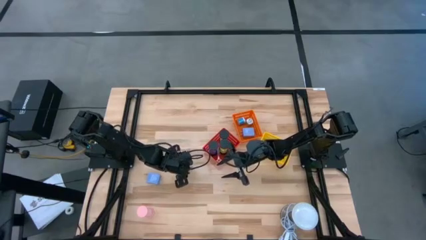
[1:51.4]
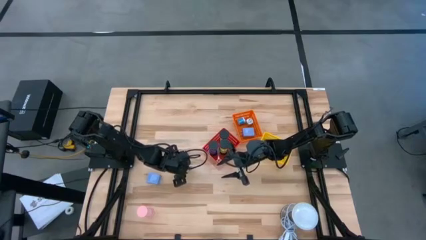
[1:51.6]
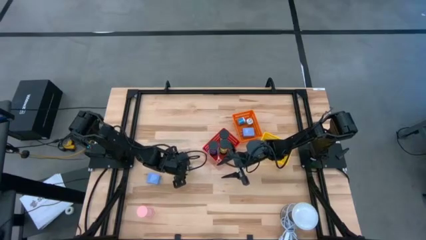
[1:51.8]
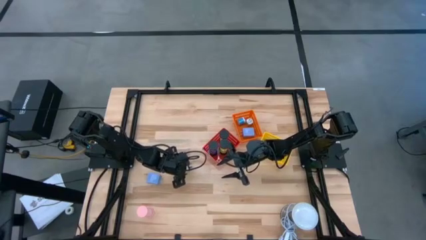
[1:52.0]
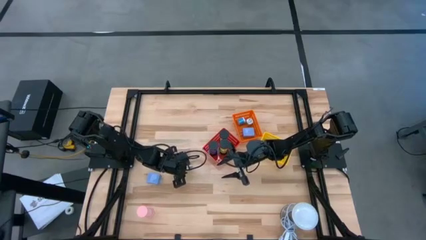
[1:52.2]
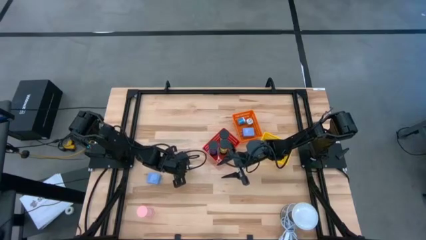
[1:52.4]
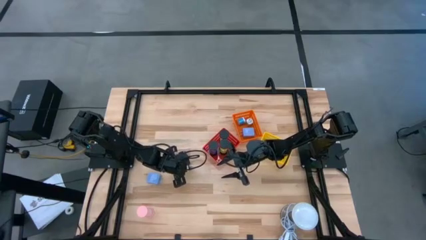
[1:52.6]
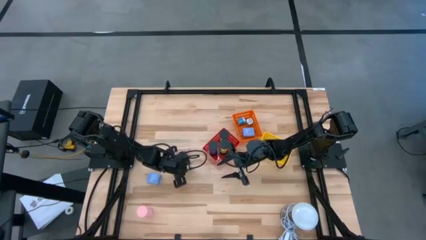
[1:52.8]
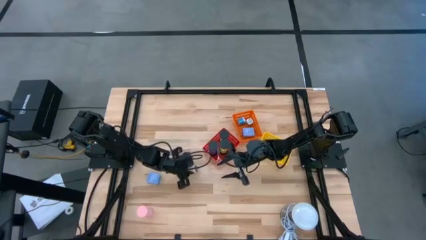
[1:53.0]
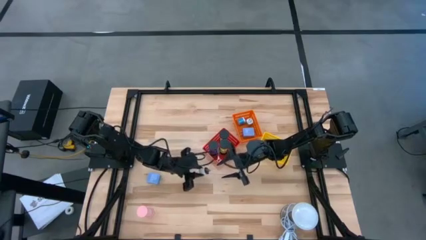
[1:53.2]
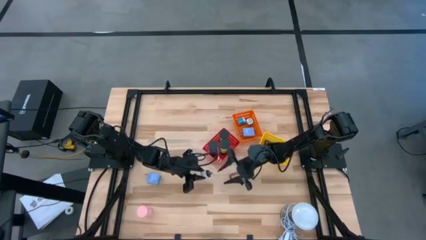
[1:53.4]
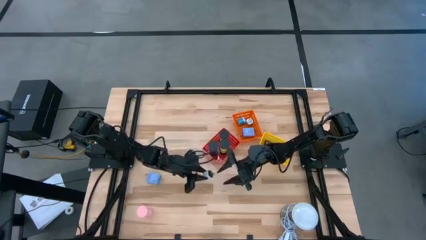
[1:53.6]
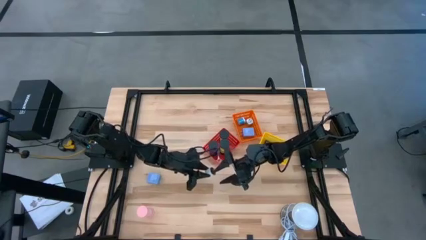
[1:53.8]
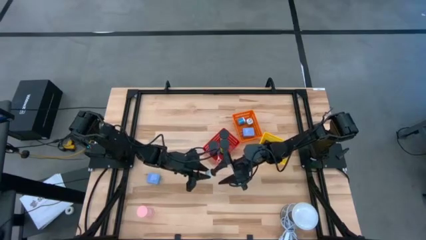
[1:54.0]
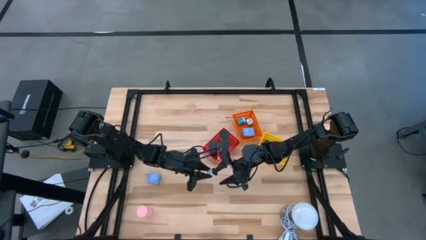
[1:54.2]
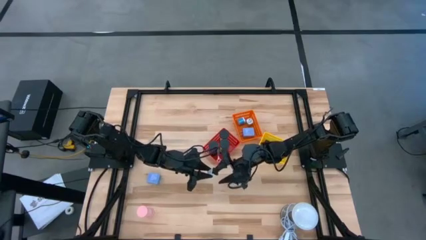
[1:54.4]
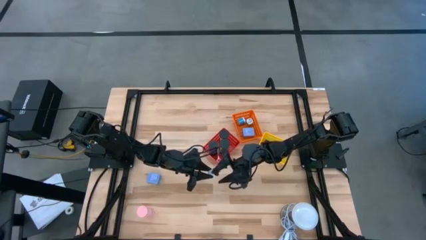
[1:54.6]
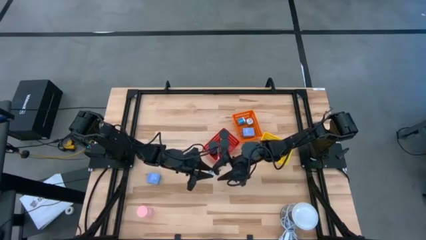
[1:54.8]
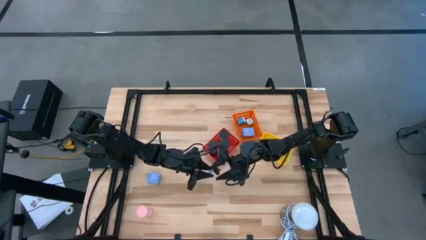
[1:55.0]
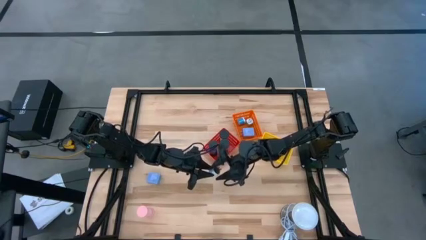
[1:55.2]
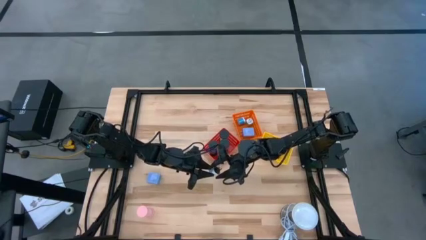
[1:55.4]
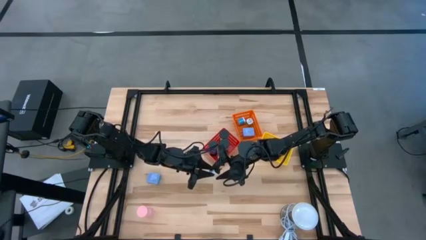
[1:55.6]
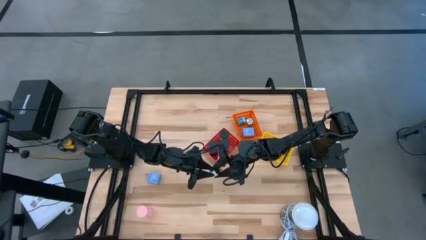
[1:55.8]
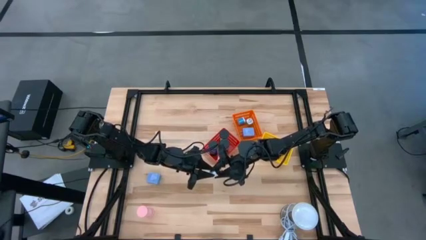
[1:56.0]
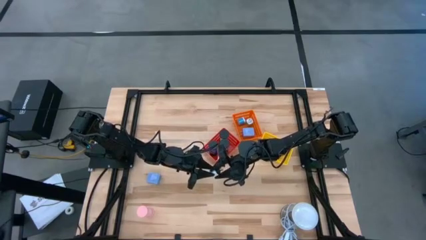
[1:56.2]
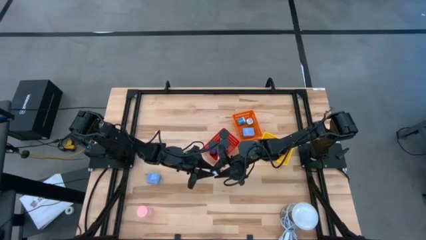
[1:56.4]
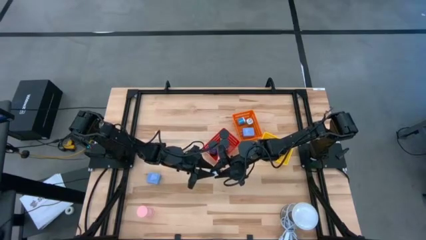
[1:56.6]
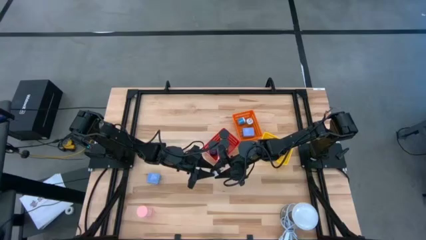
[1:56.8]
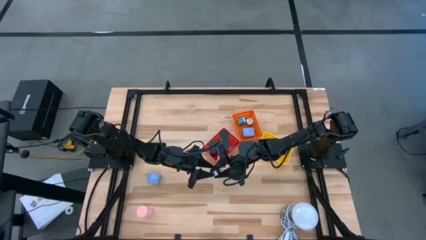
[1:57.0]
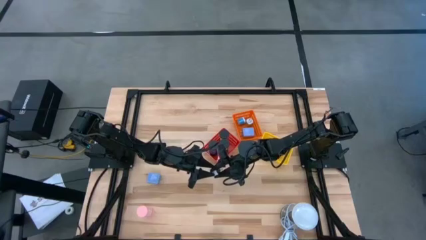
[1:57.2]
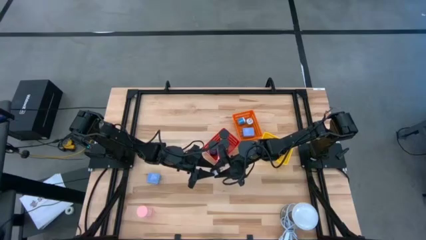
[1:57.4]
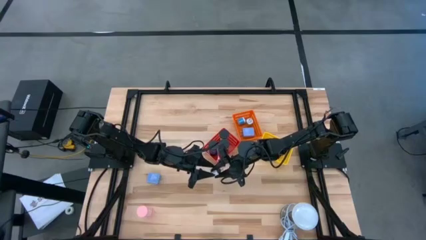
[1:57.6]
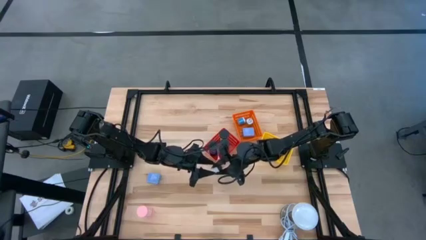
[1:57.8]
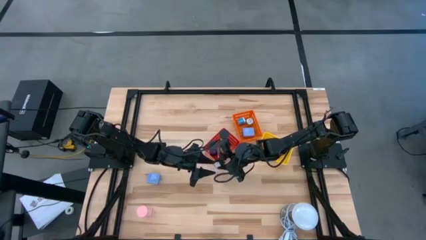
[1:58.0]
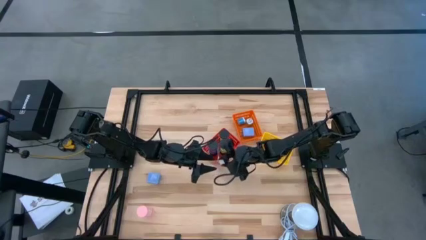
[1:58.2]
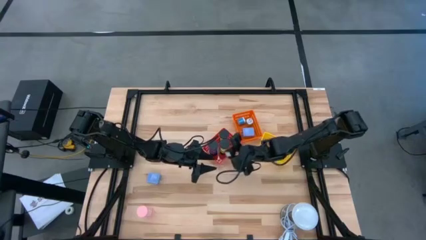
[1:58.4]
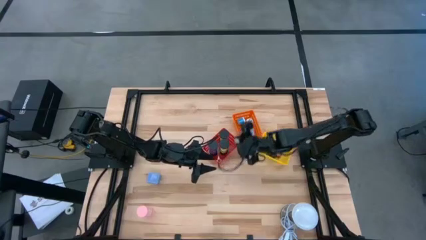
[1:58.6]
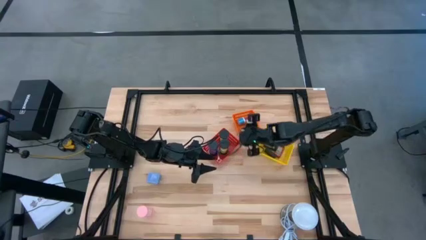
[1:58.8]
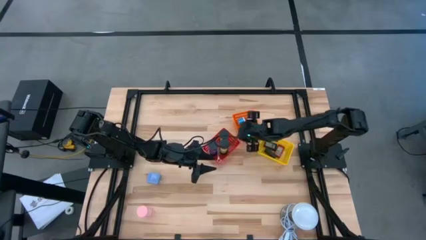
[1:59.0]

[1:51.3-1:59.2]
Task: Pick & Place Office items
Put the white charger adapter into the orange bin

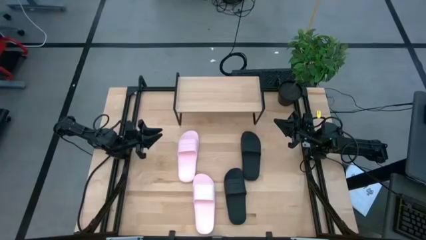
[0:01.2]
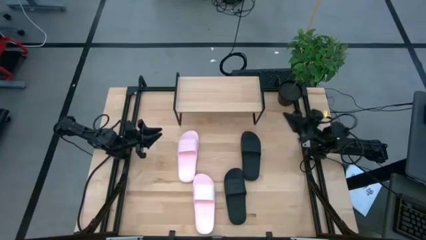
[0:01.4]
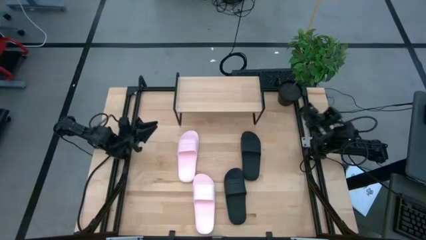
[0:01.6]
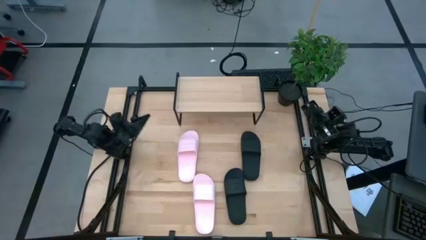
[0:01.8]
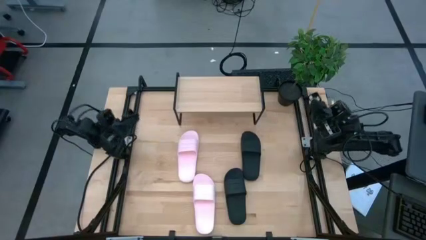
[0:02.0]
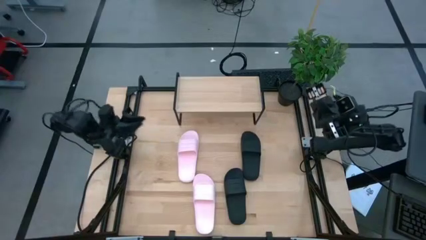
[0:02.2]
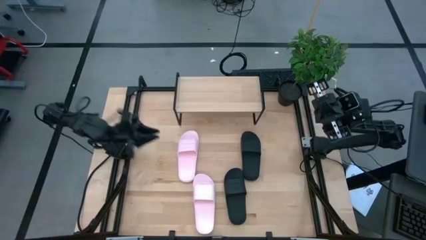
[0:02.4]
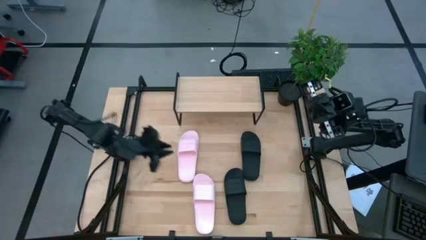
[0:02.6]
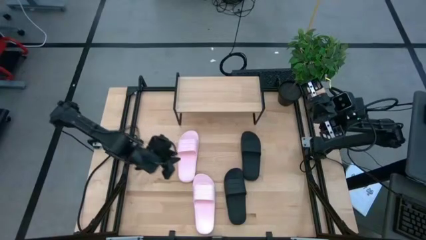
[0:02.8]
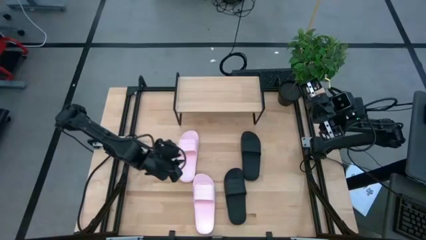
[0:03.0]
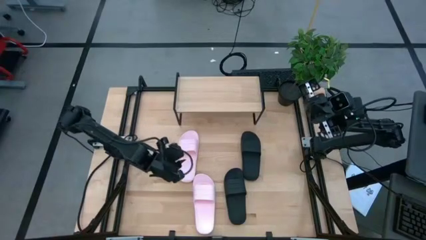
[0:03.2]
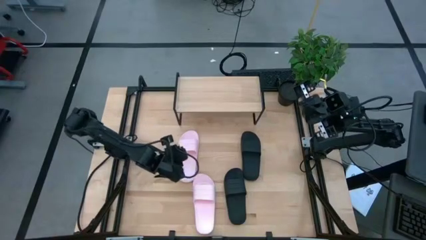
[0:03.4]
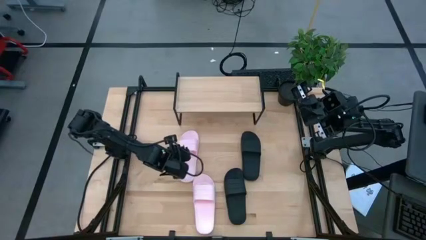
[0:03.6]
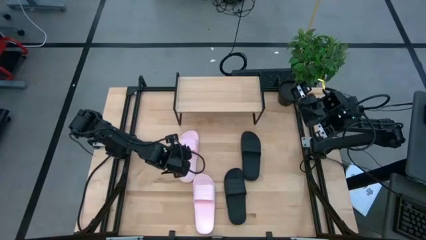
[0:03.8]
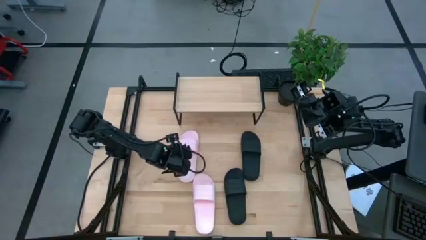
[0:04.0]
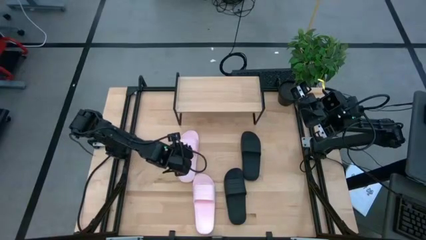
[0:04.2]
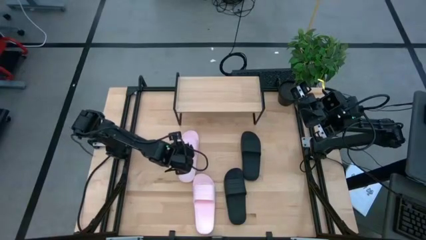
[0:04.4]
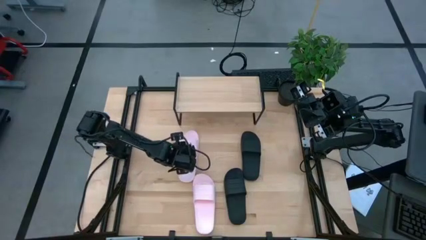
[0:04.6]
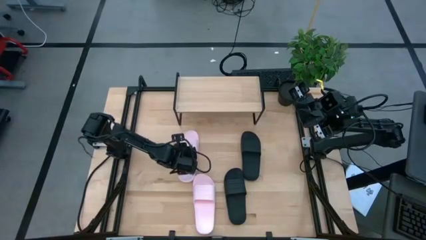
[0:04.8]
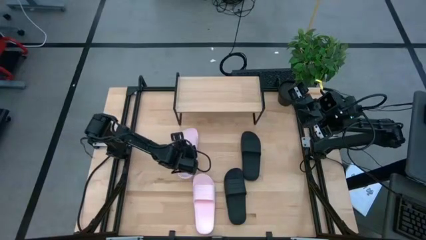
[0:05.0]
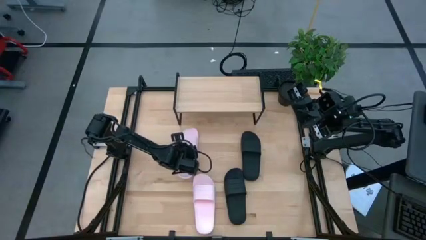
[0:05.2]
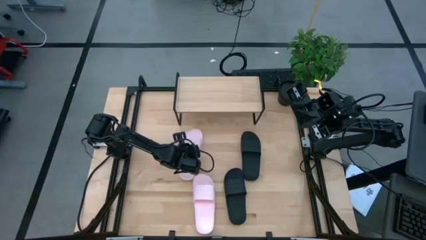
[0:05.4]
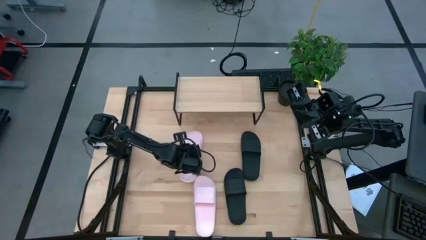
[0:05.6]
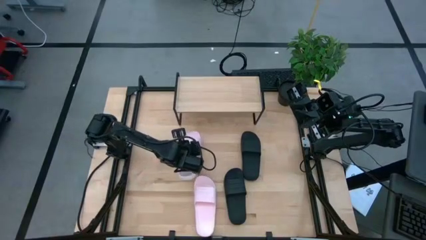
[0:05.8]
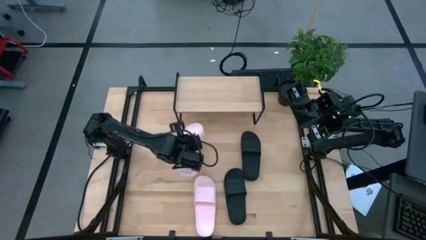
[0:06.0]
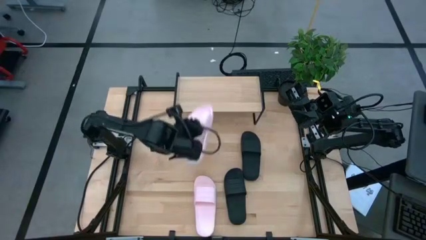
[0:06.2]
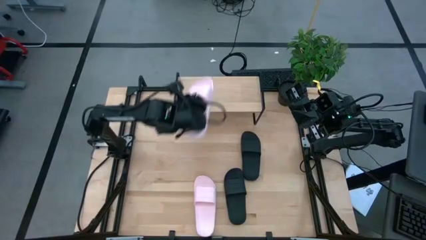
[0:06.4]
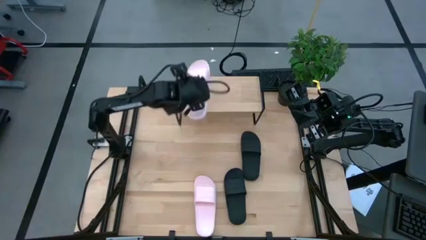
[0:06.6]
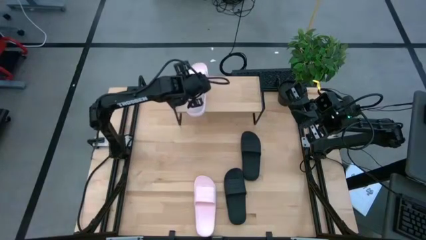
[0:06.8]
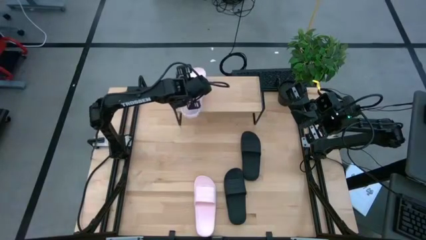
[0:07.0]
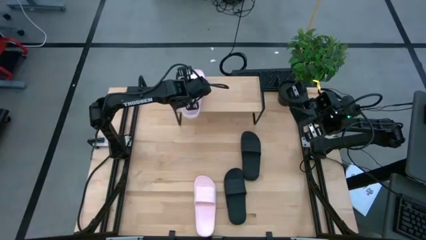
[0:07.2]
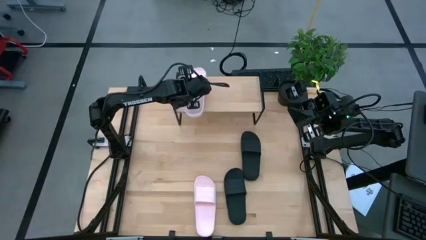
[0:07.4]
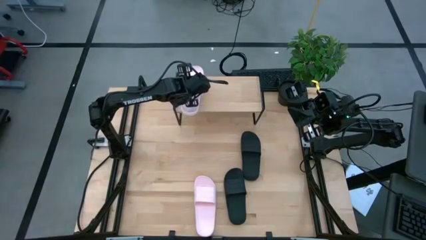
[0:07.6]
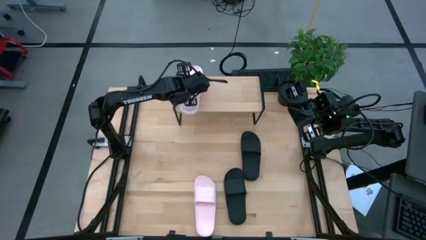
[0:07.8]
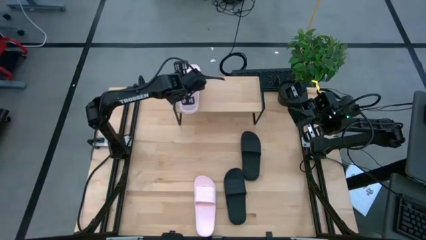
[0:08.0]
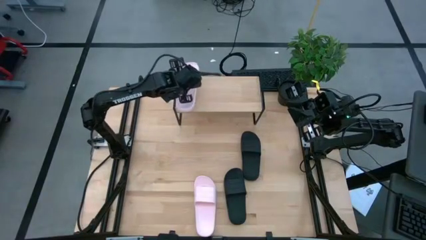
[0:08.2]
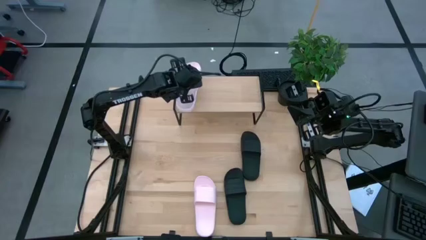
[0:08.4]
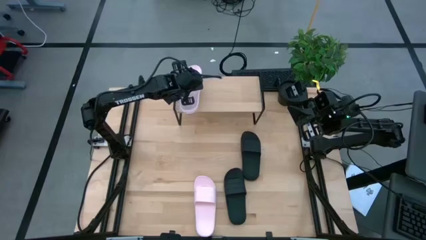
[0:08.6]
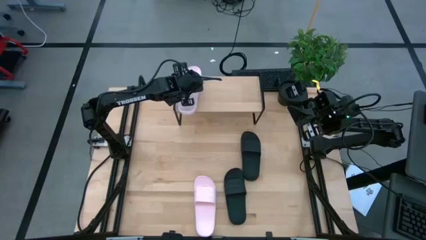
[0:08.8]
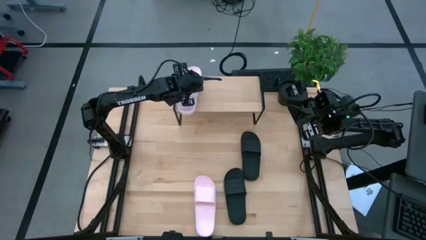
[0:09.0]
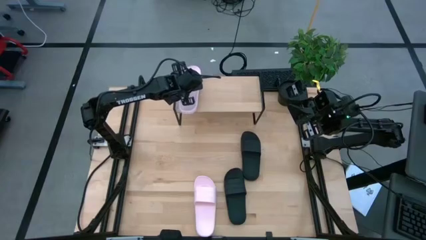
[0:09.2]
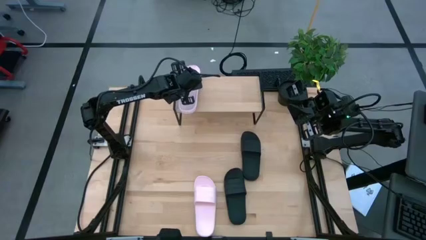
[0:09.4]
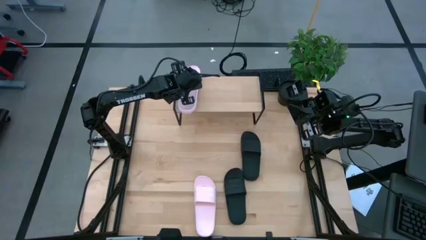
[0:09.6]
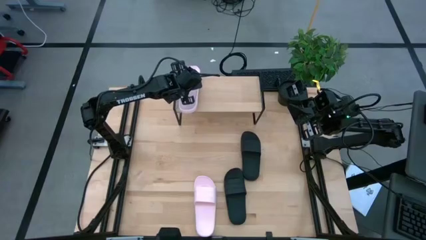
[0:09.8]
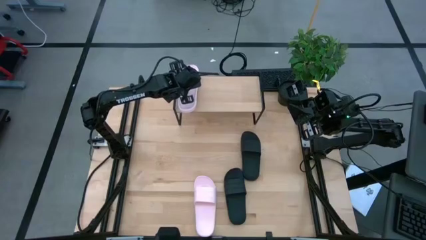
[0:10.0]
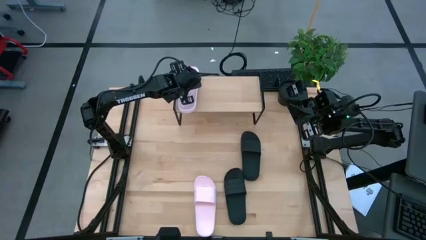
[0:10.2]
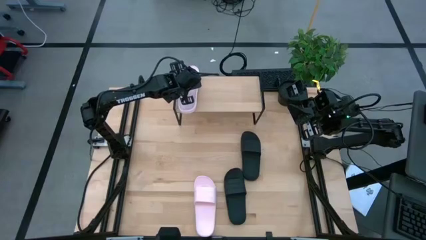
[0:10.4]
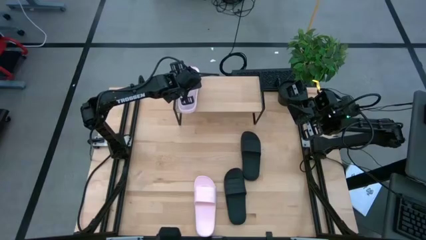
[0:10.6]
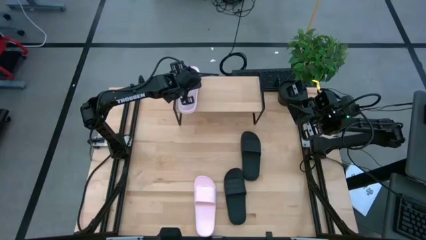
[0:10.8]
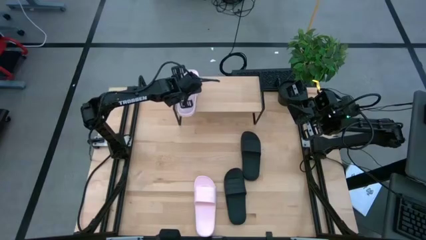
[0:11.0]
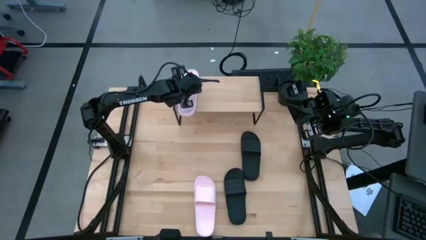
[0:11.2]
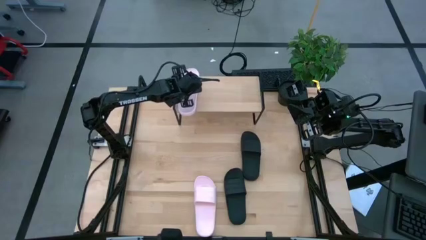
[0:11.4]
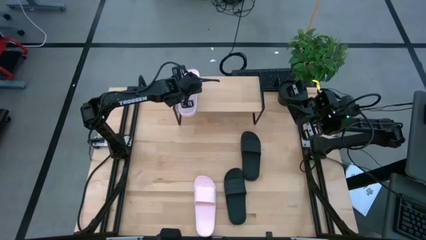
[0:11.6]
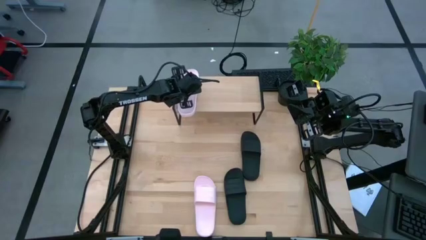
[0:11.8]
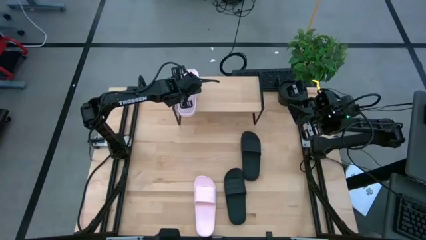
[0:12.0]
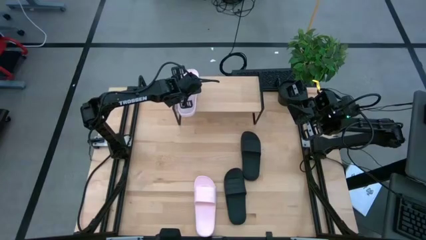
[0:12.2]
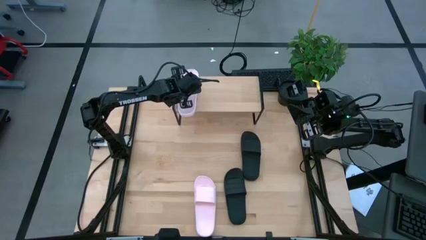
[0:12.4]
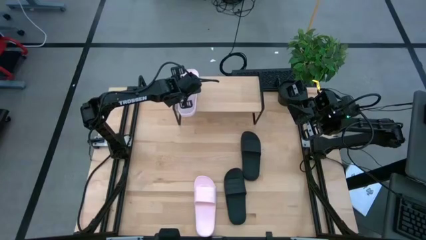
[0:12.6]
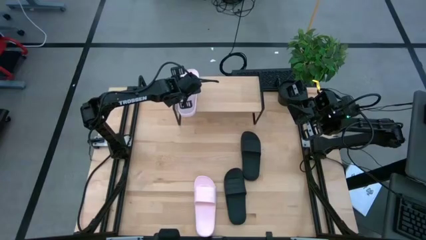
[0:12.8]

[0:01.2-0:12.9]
Task: Pick and place slides into the shelf
Put the top pink slipper on the shelf
